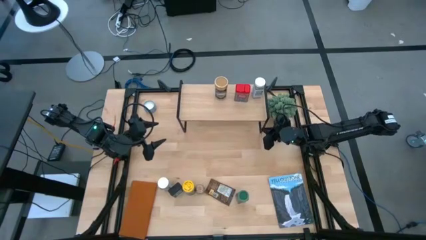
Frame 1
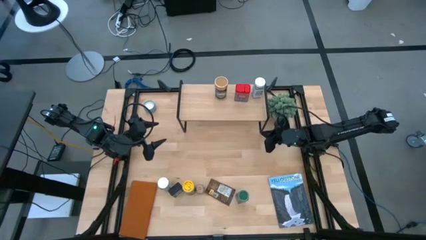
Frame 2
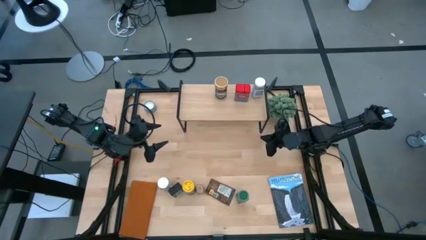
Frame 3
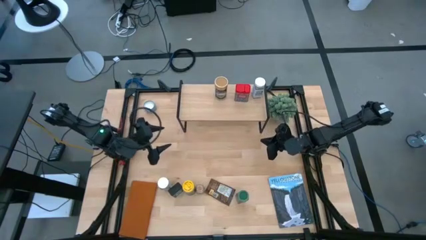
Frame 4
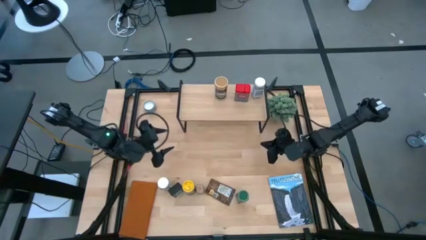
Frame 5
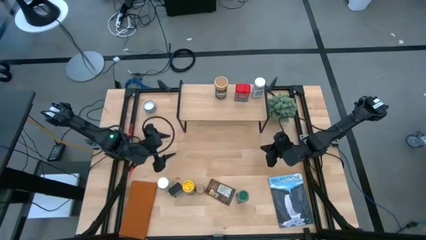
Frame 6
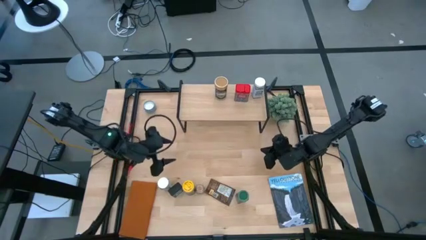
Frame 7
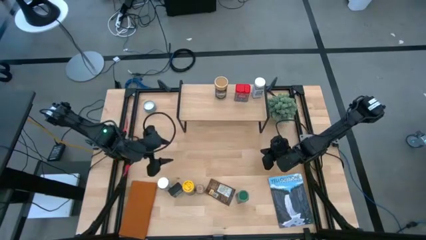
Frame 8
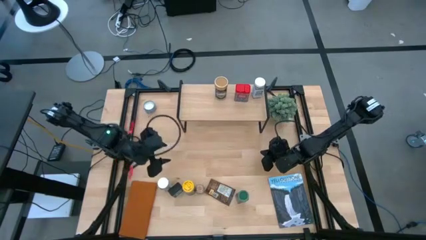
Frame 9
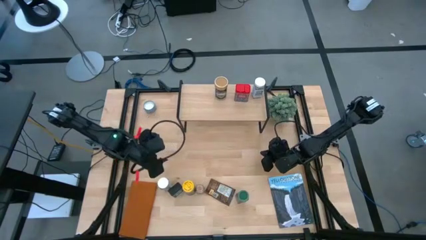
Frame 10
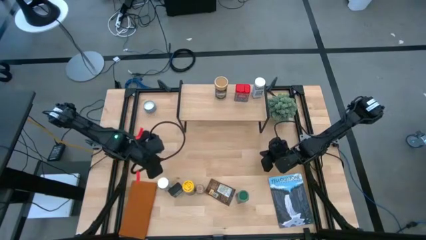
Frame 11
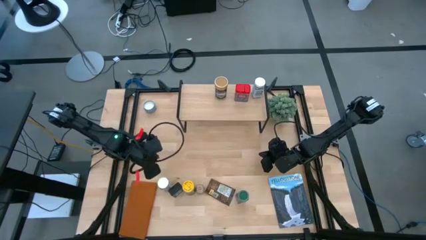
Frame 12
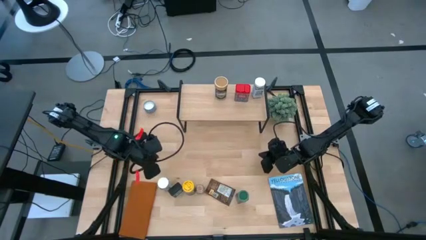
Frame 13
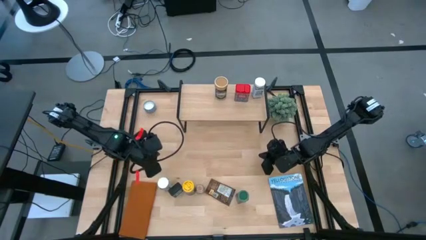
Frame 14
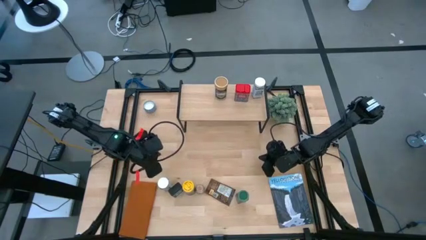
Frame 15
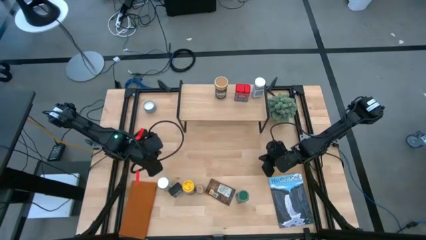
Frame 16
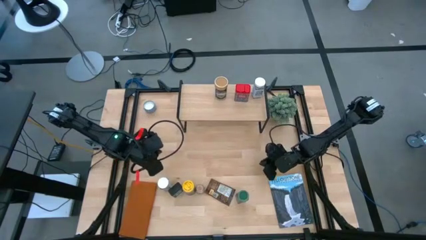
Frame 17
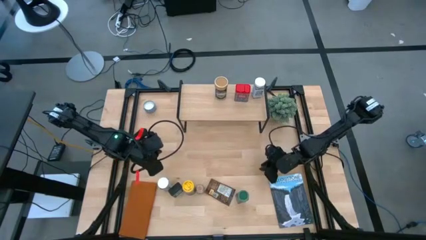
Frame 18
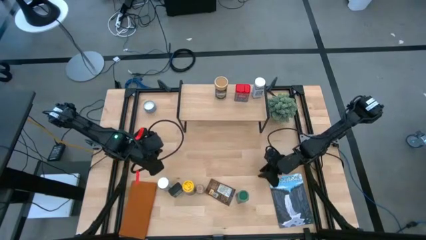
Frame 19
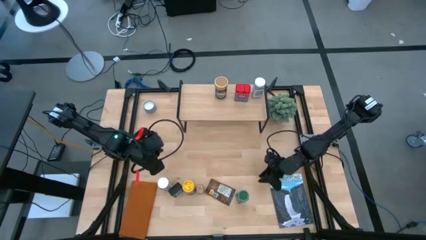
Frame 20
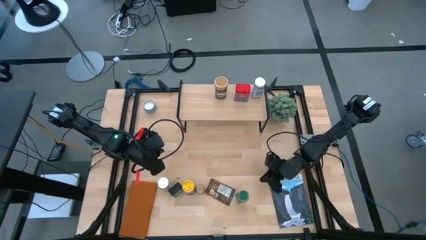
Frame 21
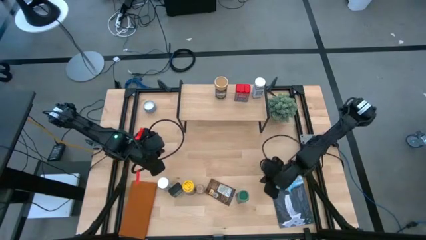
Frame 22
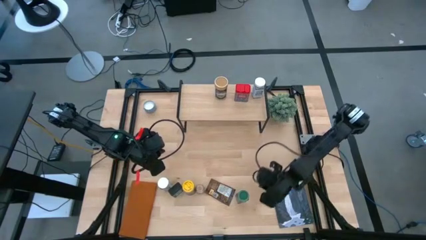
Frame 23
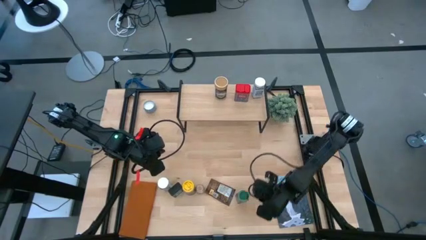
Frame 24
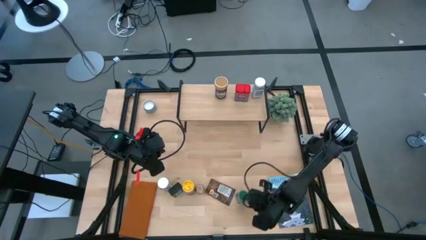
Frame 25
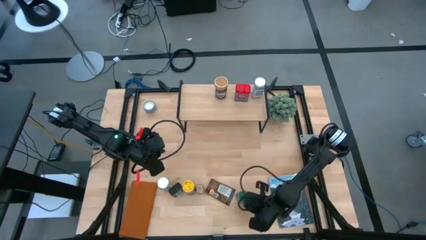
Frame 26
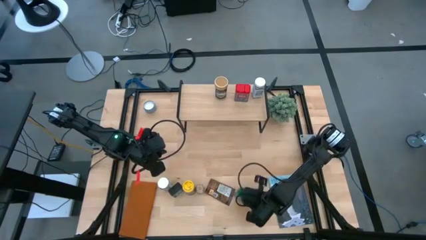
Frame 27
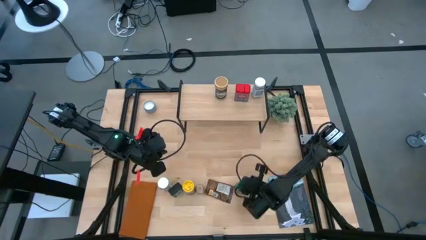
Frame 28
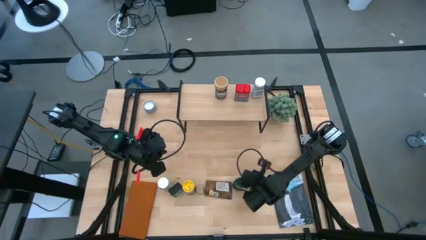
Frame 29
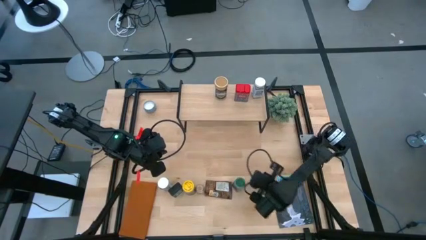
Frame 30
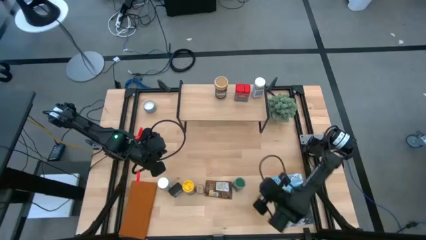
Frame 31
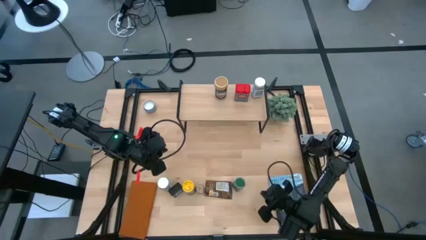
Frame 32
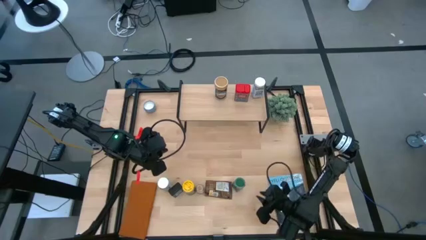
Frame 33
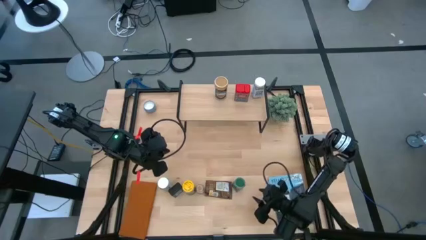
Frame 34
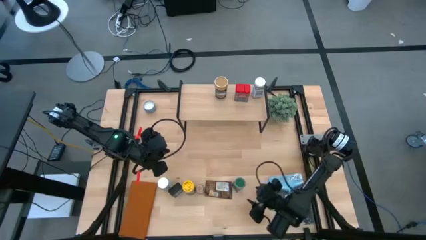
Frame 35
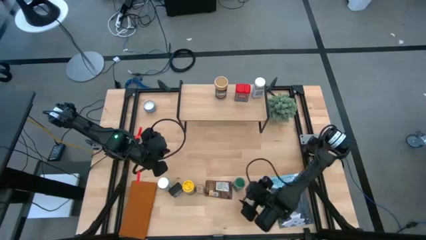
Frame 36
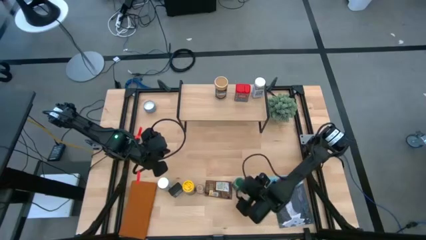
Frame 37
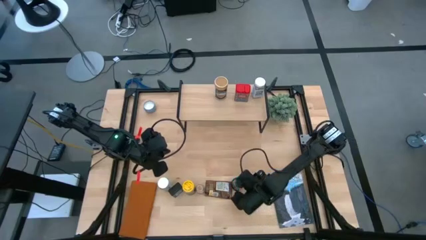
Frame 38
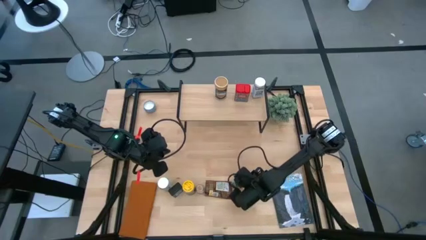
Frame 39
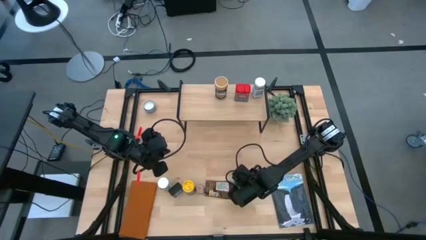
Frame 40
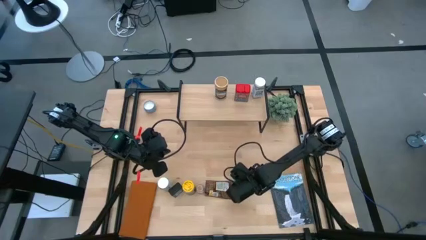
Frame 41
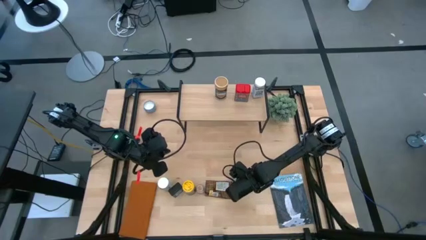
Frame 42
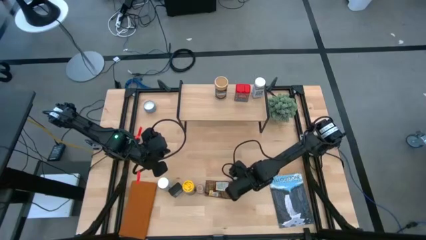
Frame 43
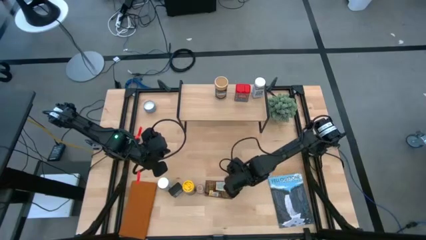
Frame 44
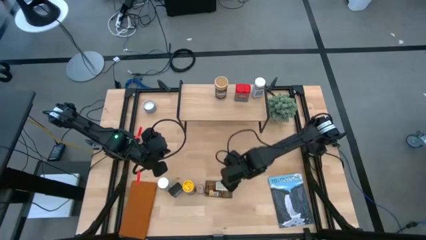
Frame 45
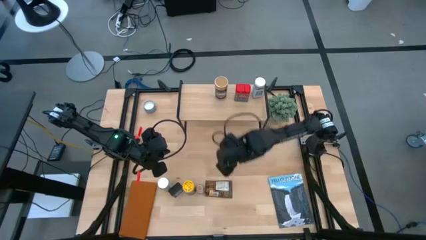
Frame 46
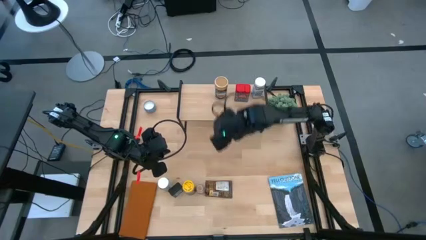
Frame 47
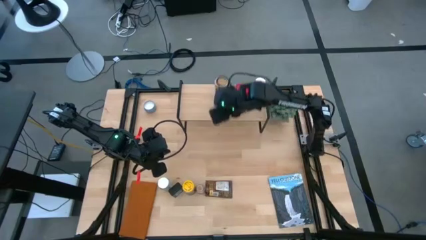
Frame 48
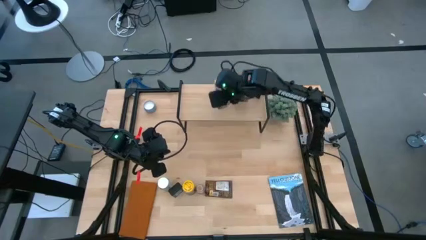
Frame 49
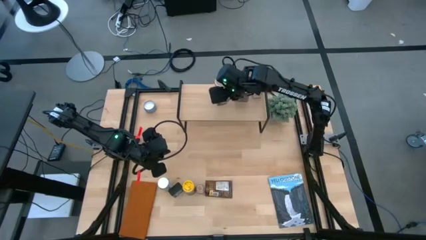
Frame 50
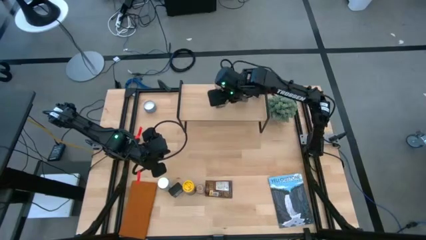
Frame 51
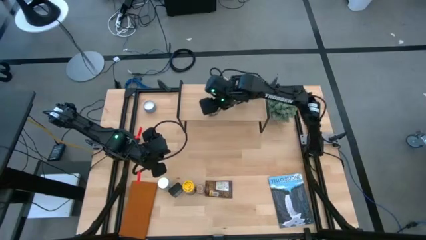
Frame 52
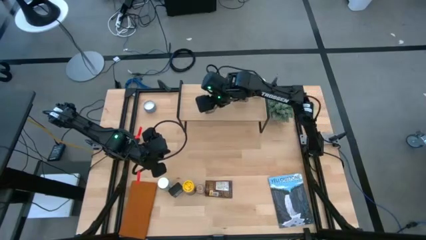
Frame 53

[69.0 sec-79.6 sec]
Task: Shelf spices
Put the green seasoning bottle on the shelf
